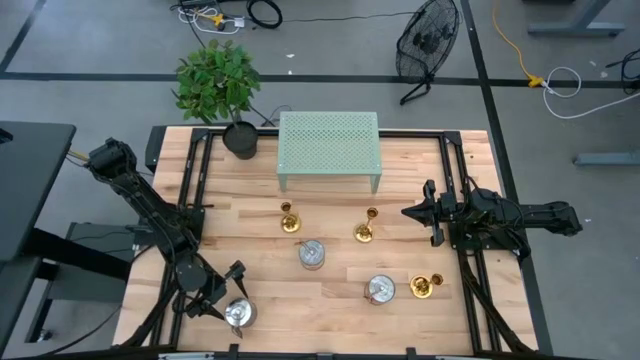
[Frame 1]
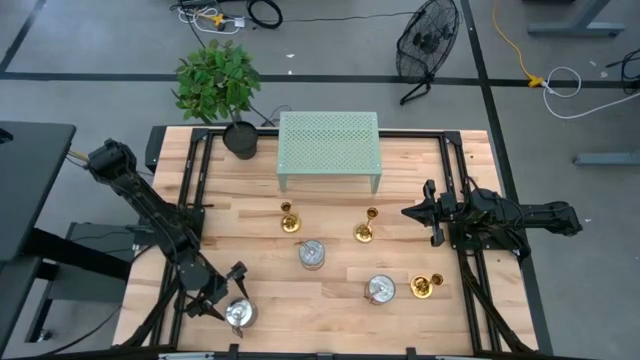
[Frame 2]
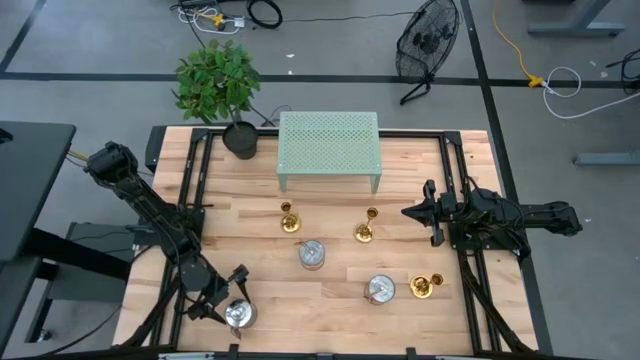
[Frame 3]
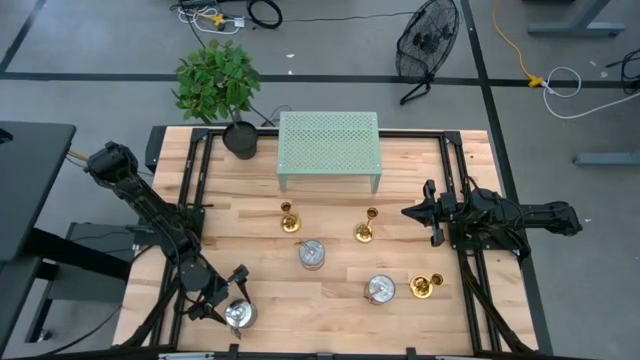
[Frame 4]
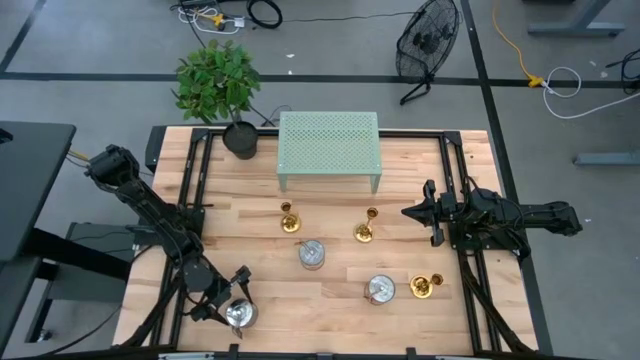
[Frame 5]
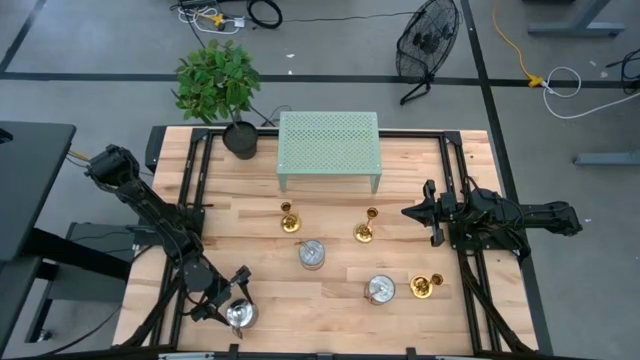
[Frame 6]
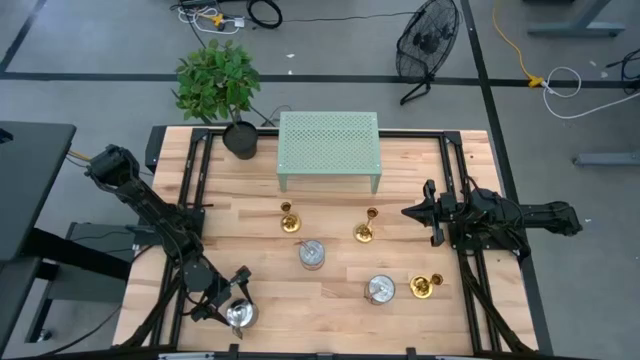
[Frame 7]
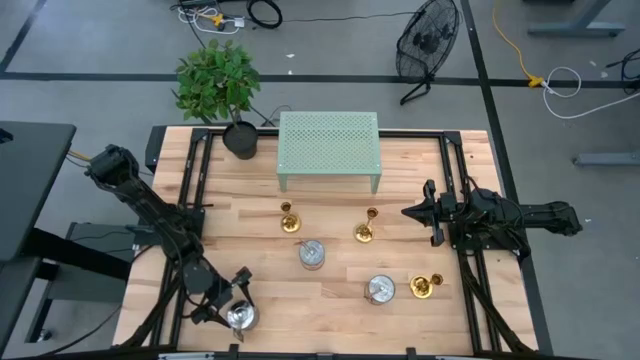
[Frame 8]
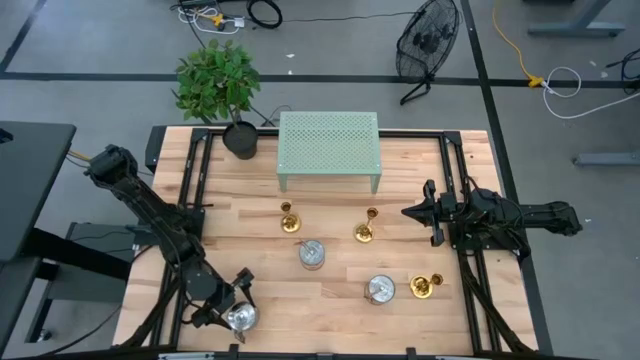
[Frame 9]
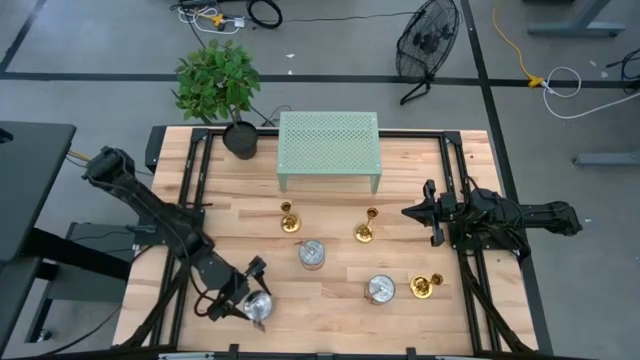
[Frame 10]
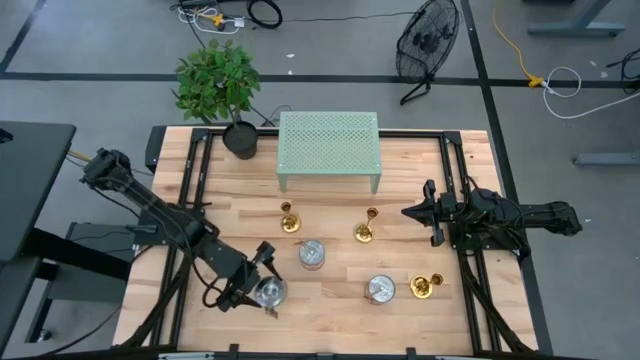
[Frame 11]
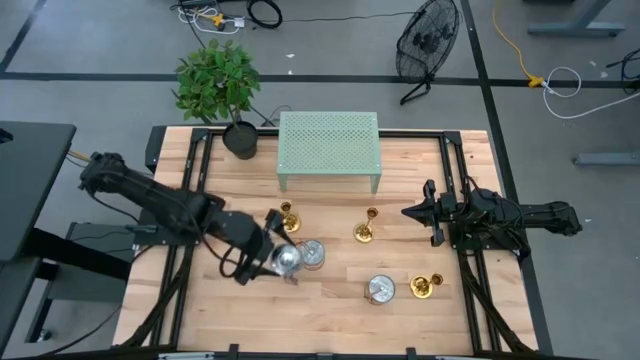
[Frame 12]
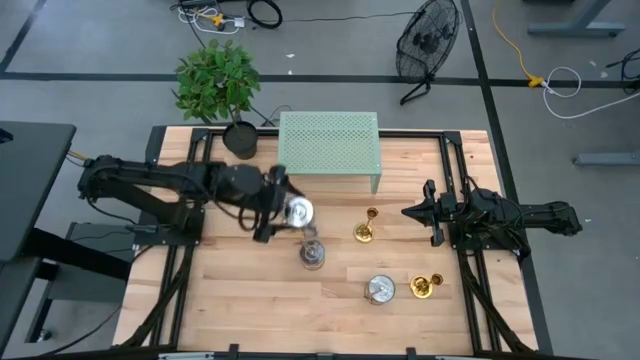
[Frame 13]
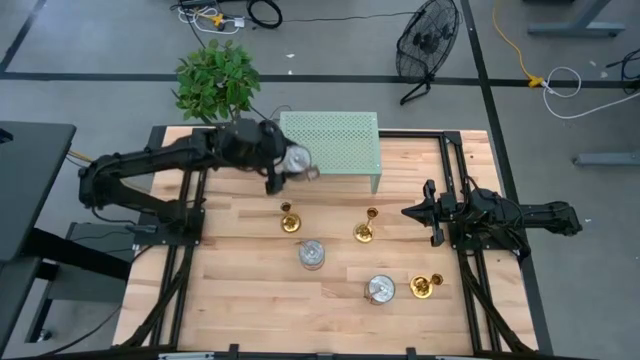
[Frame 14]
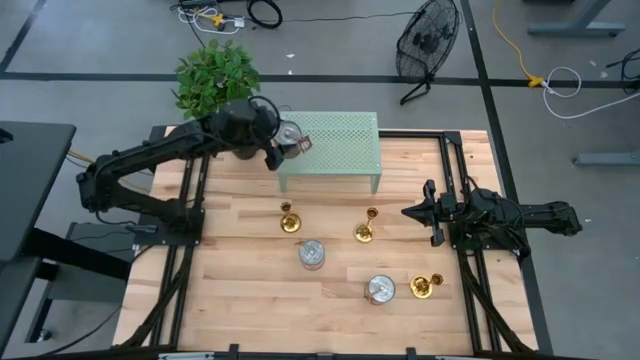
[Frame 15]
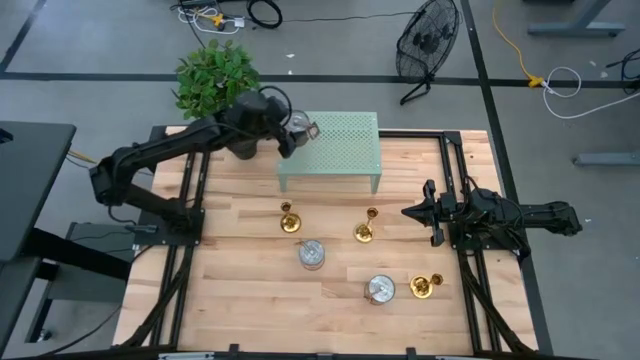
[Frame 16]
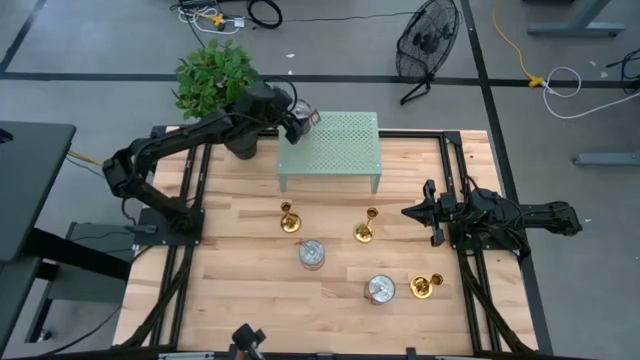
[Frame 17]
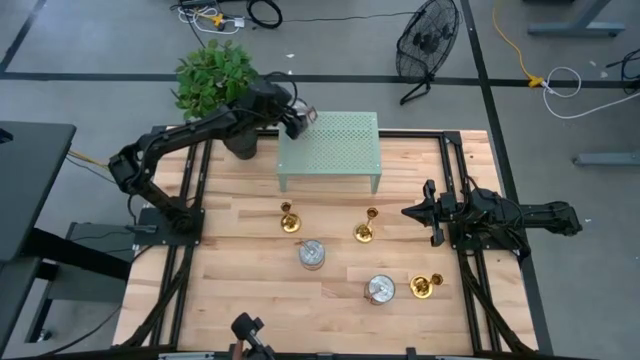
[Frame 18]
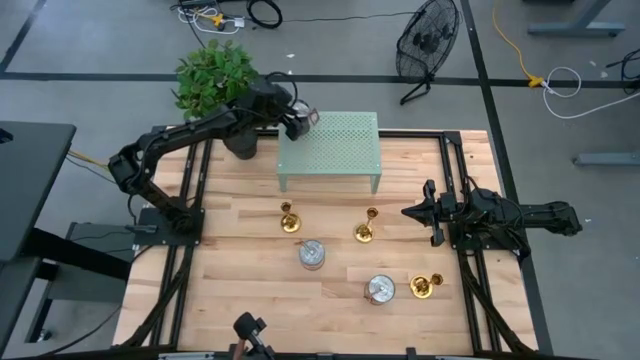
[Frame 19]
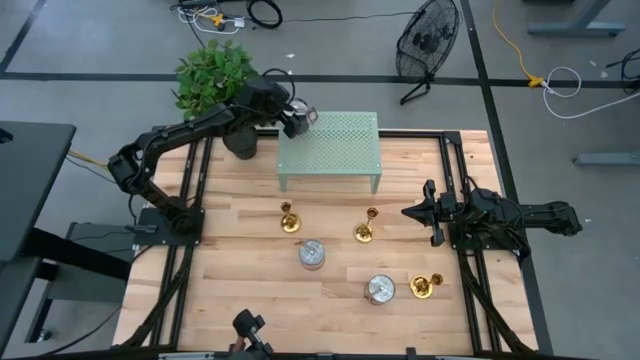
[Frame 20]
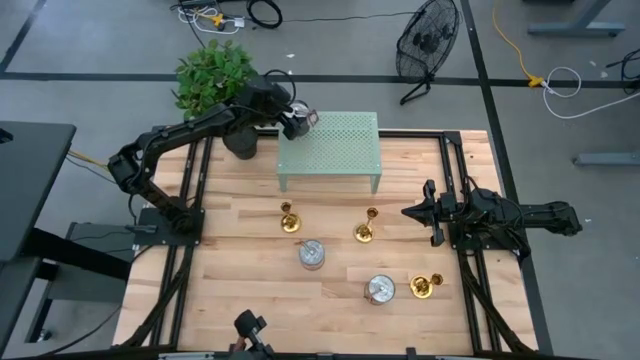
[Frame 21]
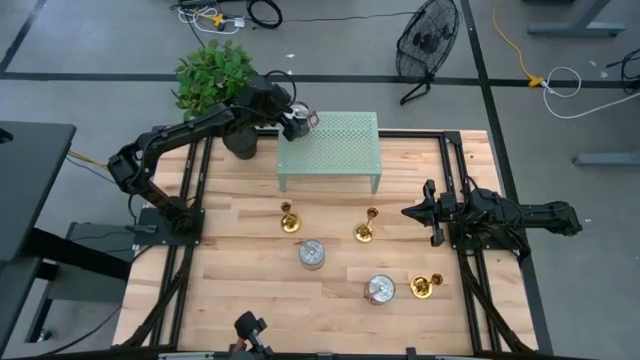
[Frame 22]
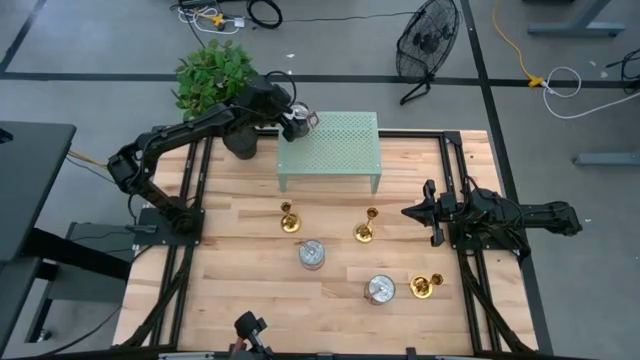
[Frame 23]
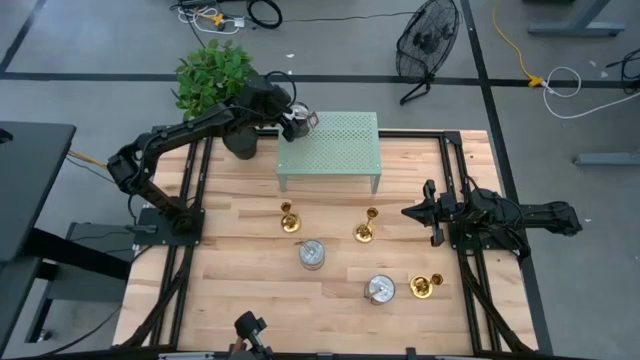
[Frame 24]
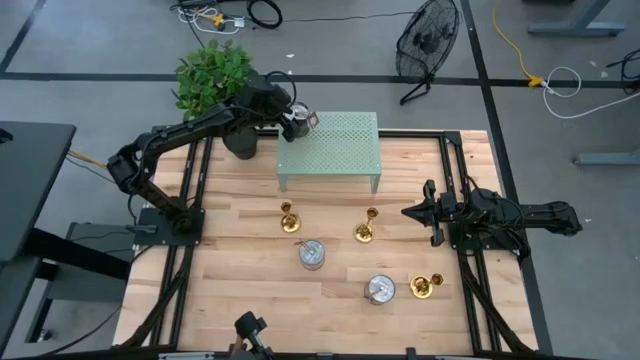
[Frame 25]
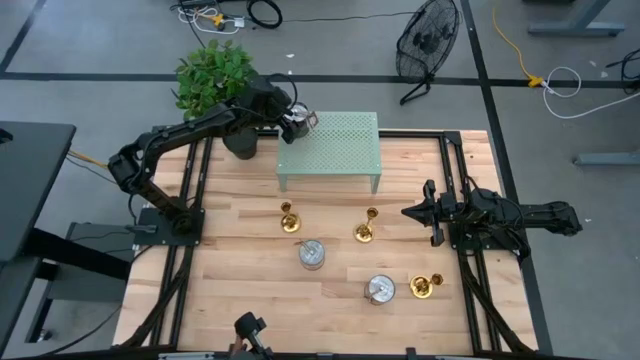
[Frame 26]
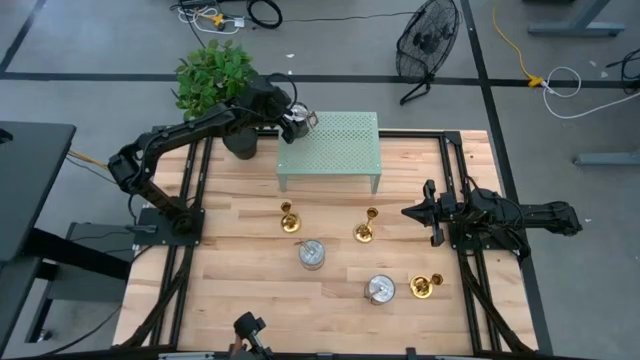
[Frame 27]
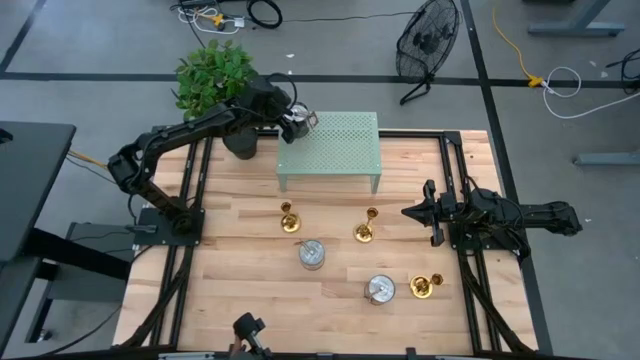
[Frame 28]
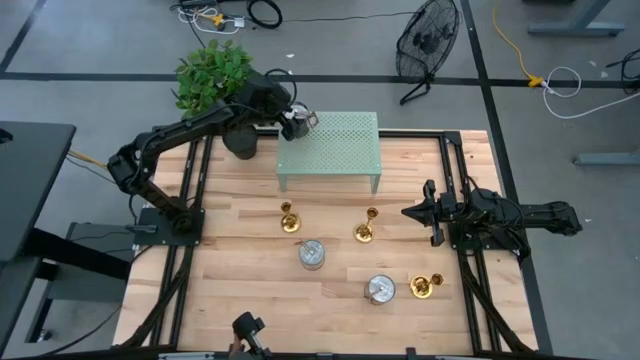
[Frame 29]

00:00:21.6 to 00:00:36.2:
Task: Pick & Place candle stick holders
Put the bottom silver scented candle on the shelf

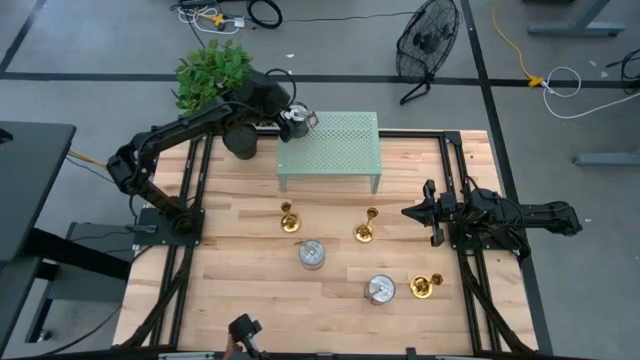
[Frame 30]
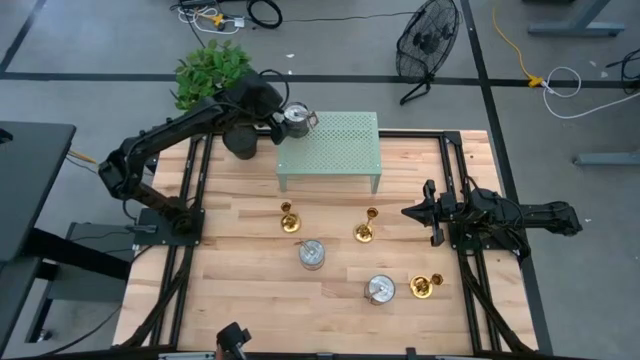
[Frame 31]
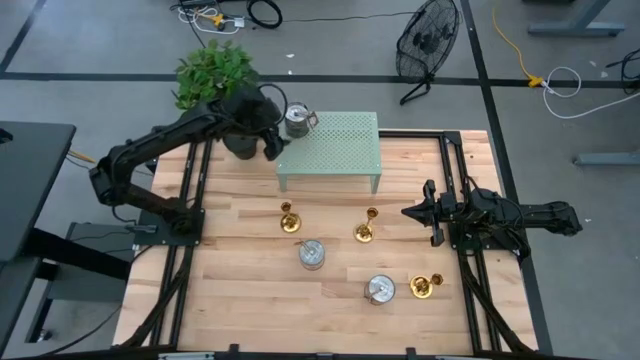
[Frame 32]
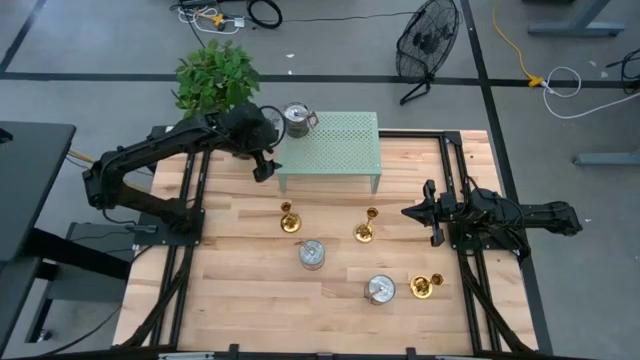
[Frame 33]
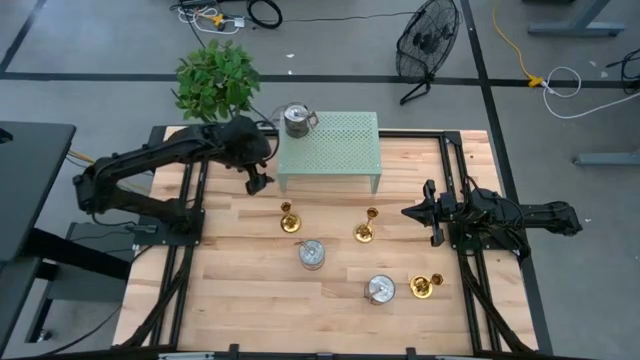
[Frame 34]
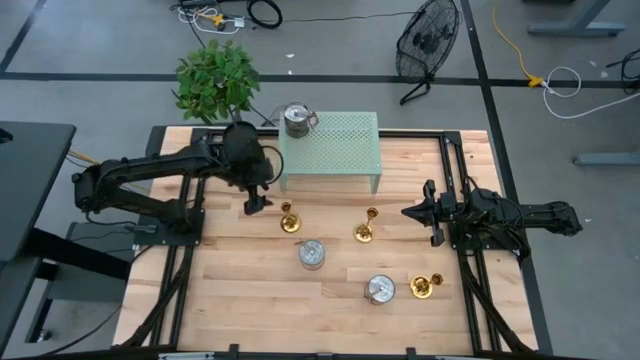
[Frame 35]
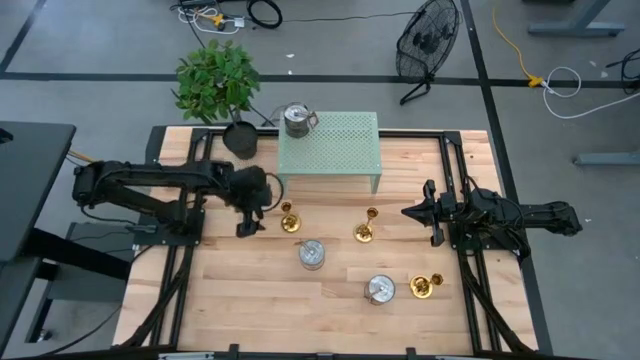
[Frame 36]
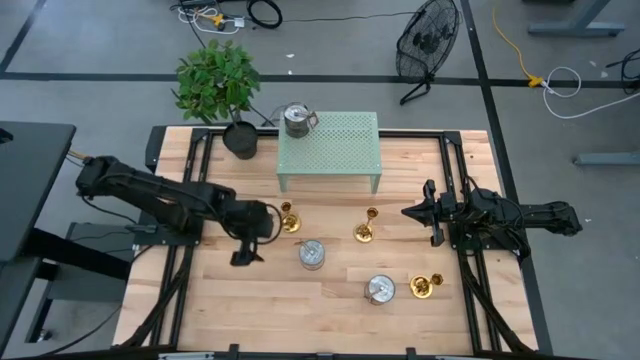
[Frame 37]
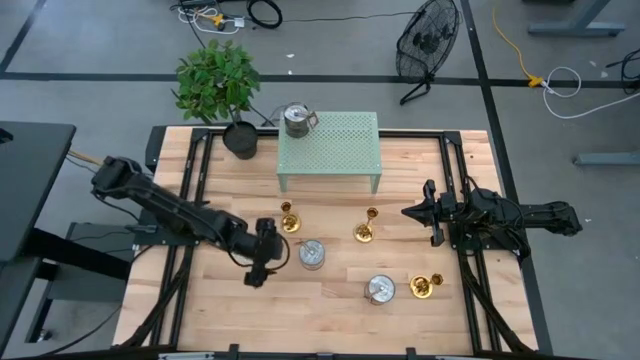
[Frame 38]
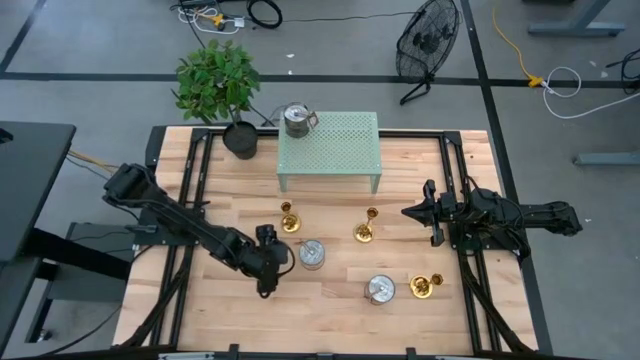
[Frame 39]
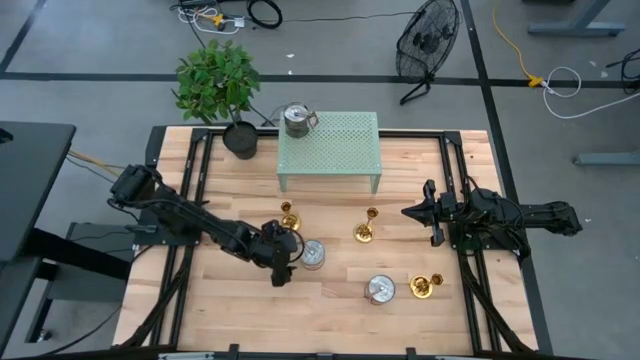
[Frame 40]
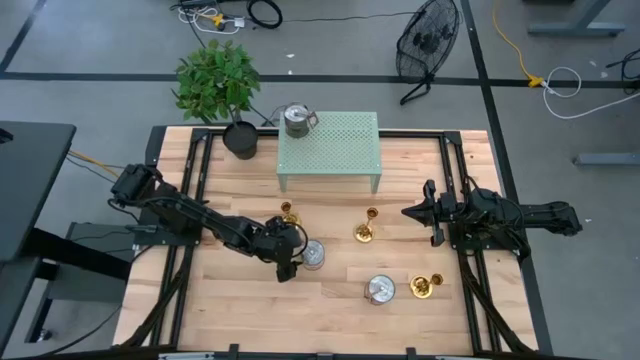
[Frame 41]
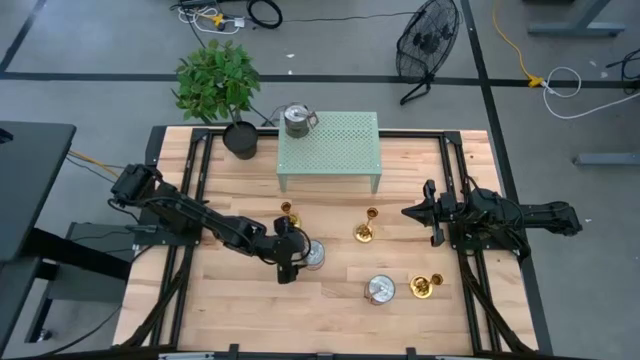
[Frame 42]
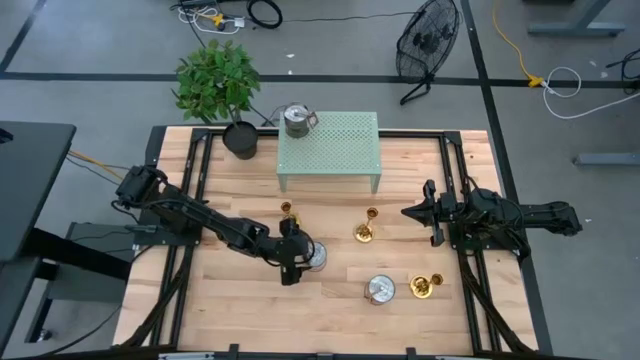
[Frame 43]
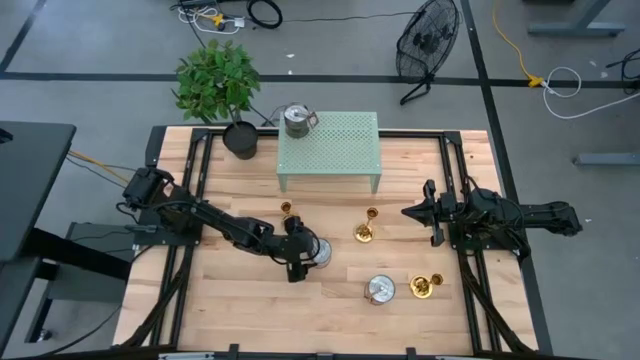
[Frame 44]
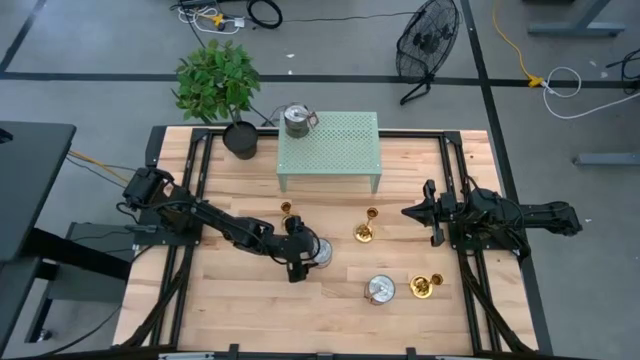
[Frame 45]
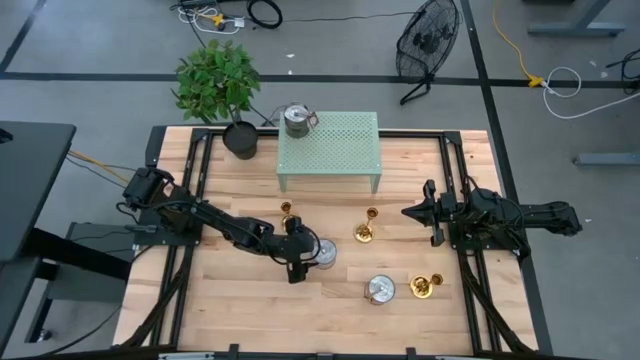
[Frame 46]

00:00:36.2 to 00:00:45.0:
Put the top silver scented candle on the shelf
